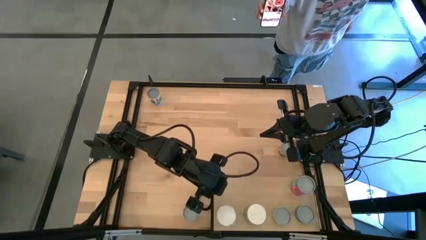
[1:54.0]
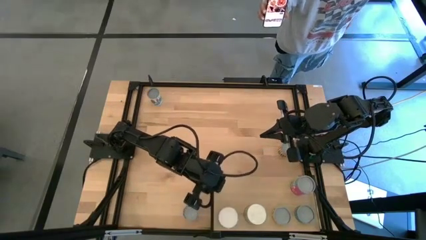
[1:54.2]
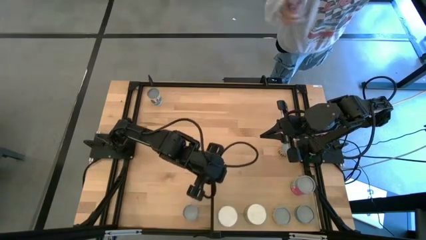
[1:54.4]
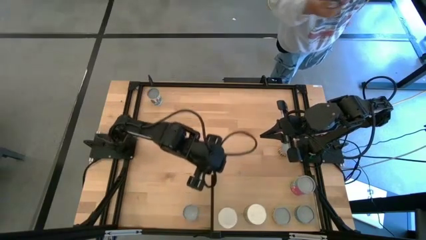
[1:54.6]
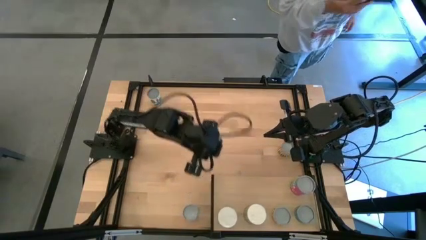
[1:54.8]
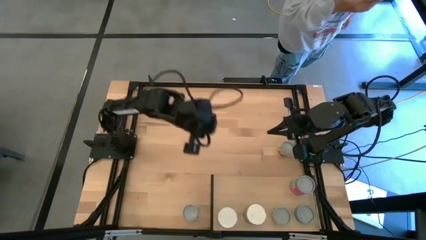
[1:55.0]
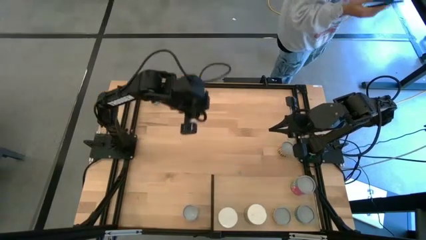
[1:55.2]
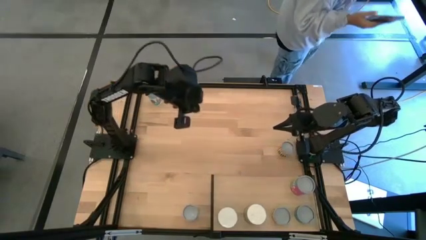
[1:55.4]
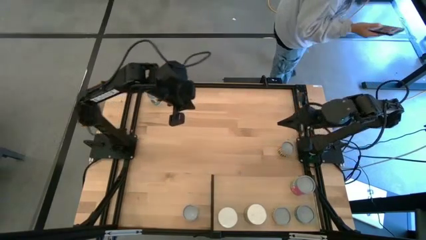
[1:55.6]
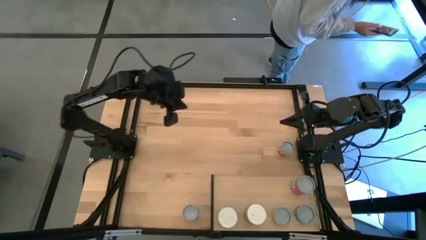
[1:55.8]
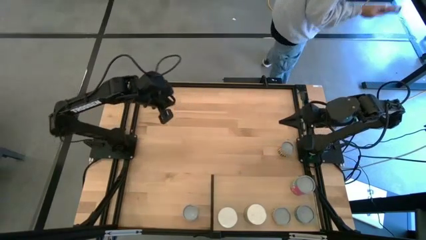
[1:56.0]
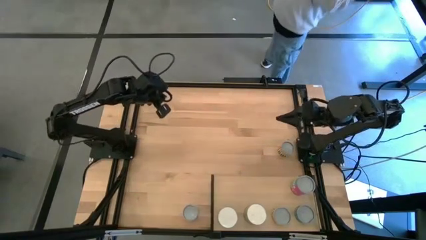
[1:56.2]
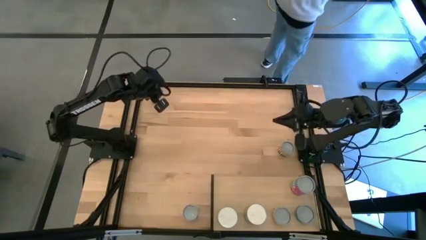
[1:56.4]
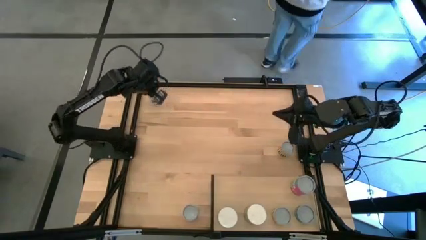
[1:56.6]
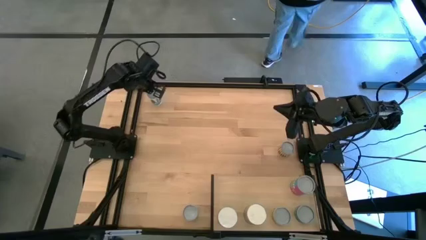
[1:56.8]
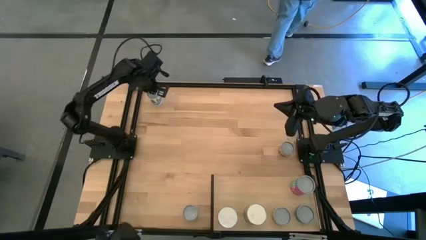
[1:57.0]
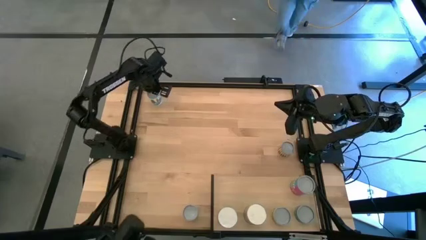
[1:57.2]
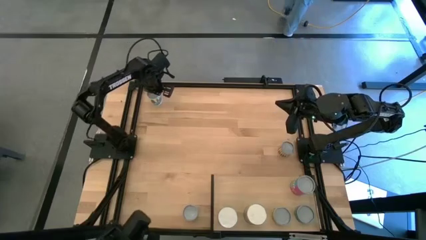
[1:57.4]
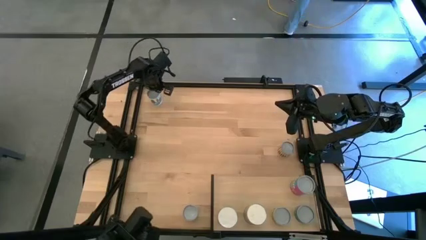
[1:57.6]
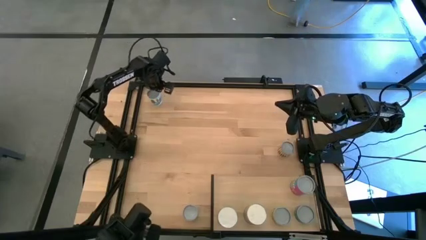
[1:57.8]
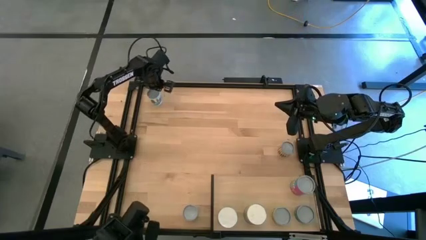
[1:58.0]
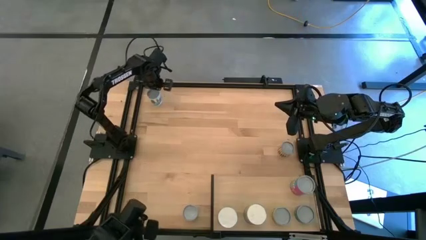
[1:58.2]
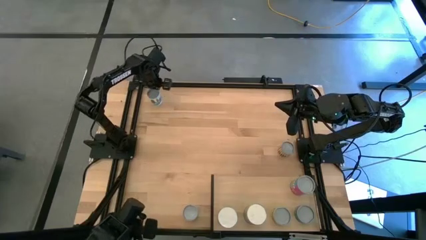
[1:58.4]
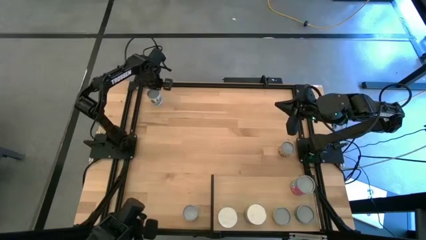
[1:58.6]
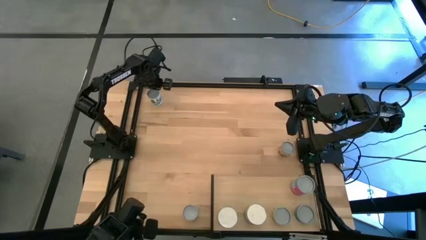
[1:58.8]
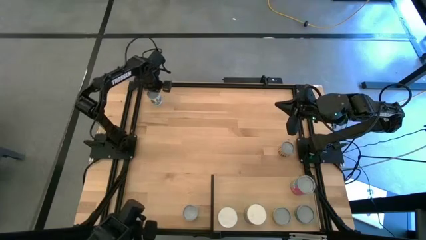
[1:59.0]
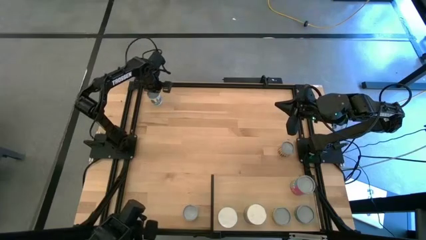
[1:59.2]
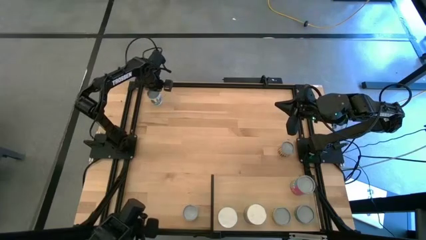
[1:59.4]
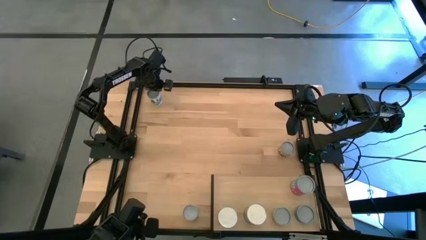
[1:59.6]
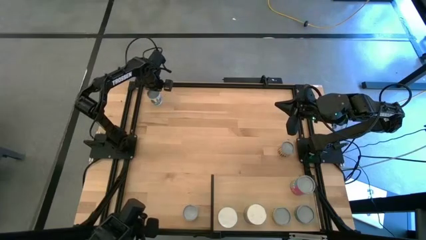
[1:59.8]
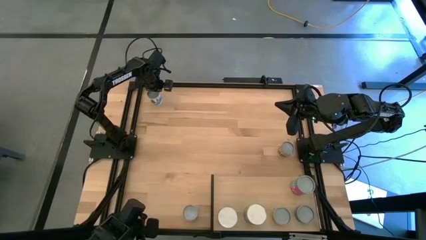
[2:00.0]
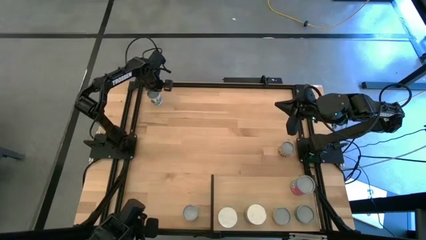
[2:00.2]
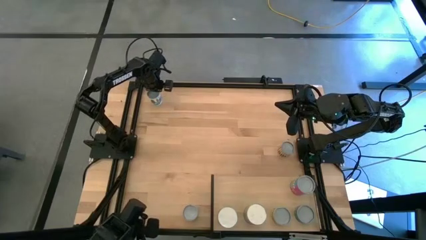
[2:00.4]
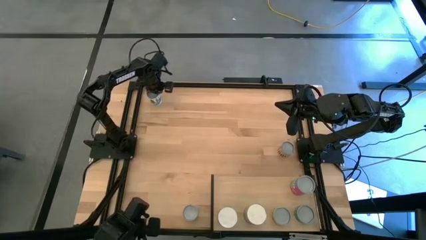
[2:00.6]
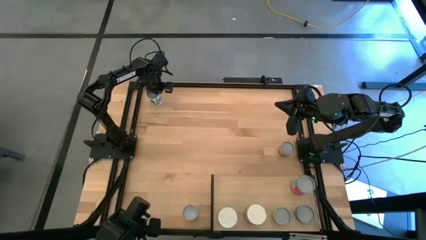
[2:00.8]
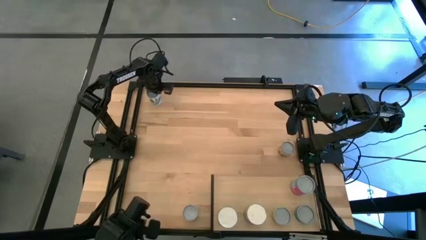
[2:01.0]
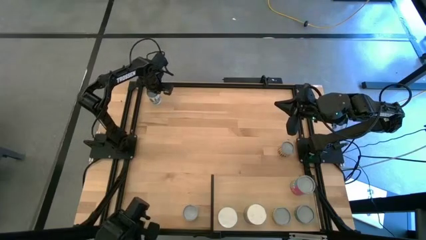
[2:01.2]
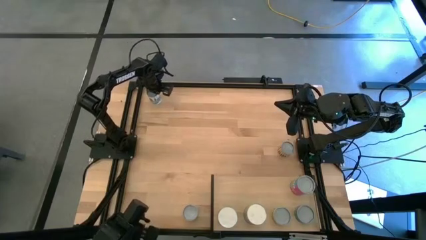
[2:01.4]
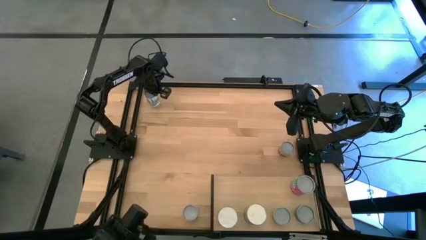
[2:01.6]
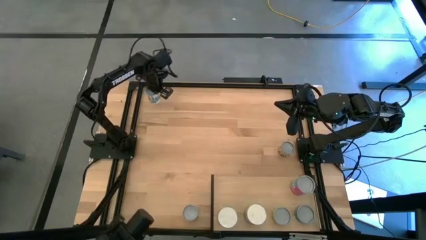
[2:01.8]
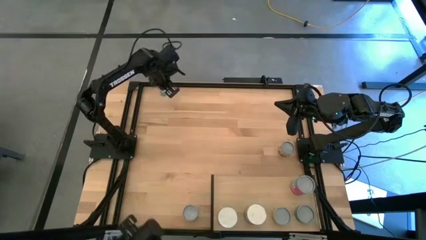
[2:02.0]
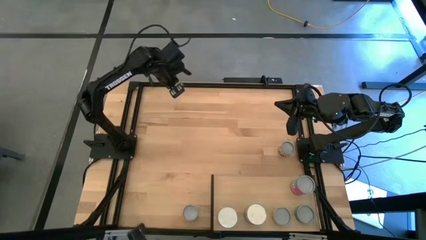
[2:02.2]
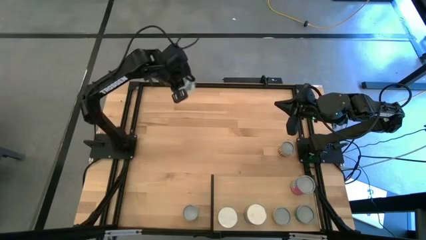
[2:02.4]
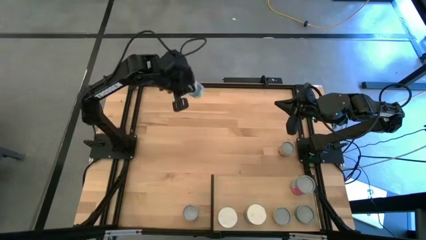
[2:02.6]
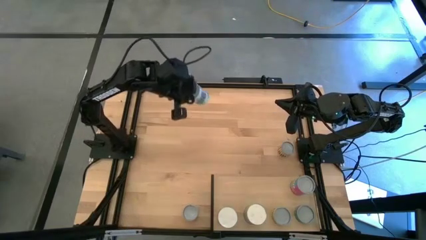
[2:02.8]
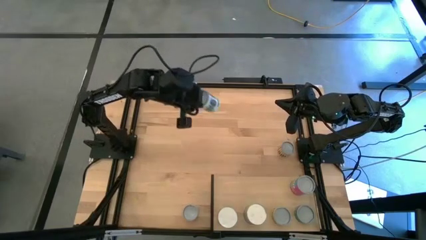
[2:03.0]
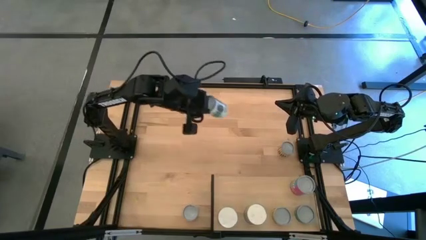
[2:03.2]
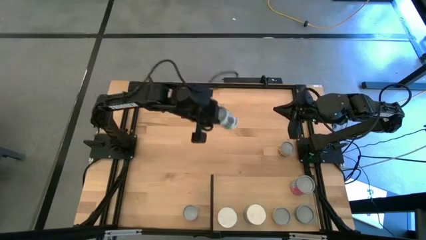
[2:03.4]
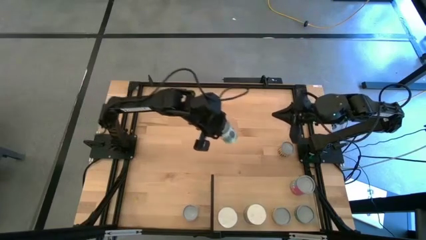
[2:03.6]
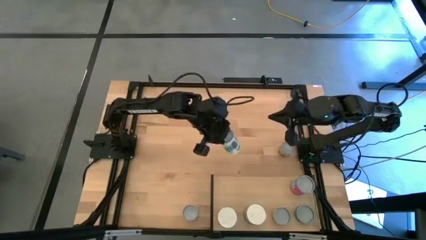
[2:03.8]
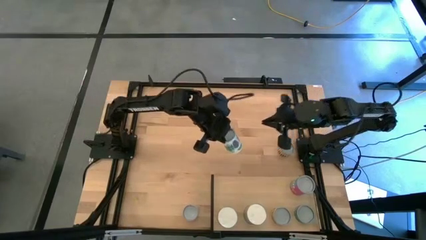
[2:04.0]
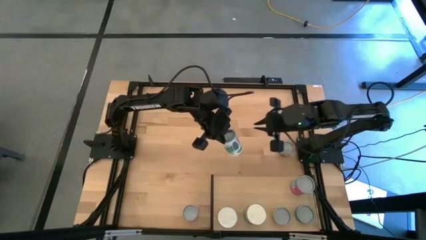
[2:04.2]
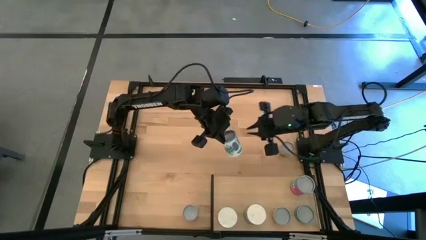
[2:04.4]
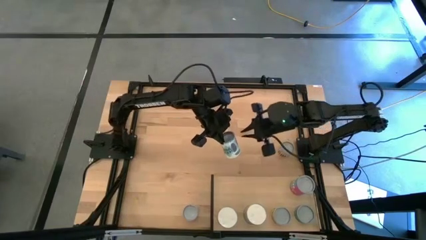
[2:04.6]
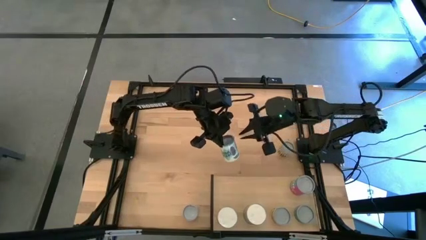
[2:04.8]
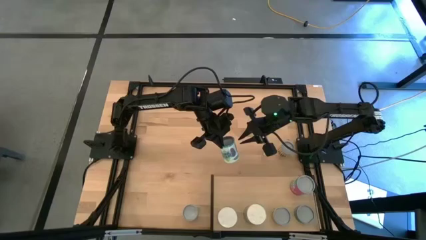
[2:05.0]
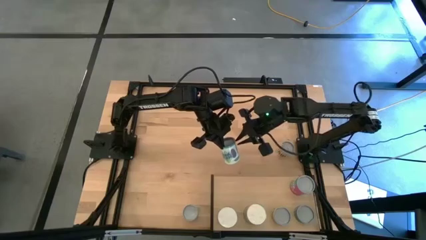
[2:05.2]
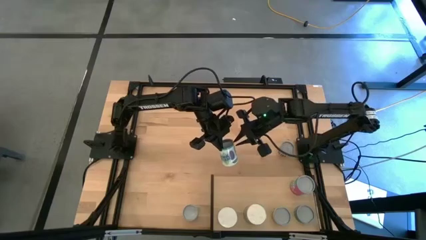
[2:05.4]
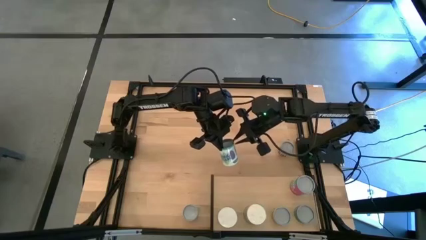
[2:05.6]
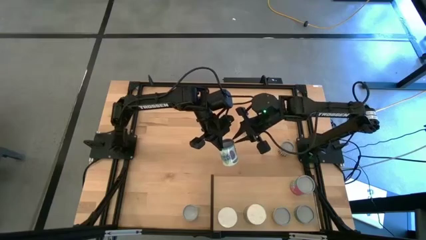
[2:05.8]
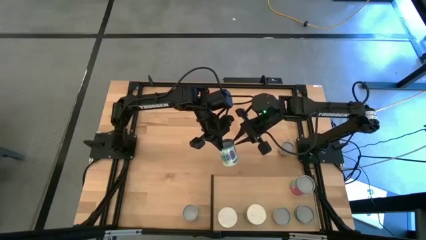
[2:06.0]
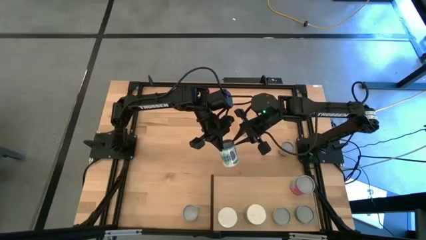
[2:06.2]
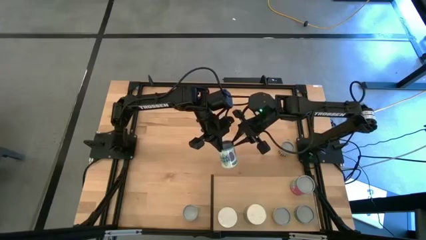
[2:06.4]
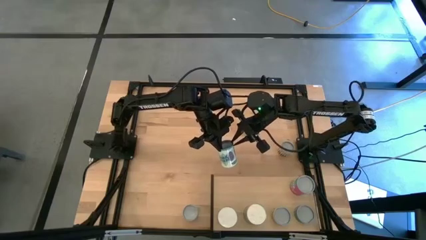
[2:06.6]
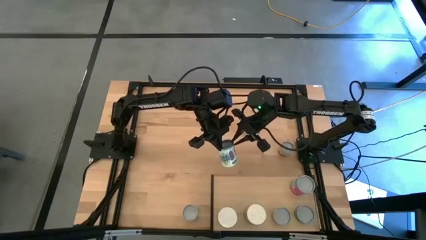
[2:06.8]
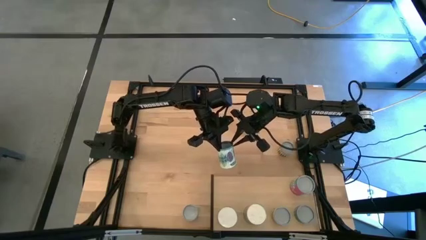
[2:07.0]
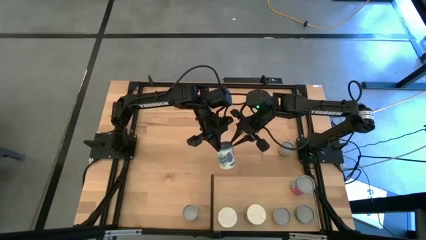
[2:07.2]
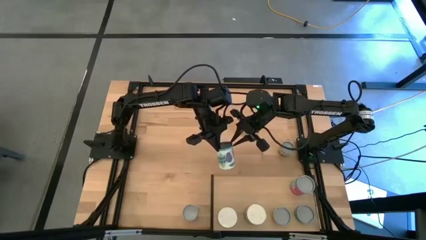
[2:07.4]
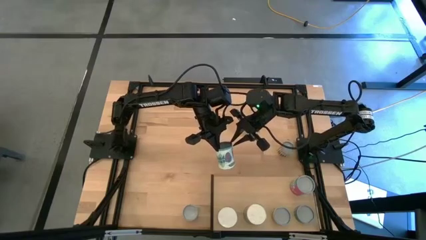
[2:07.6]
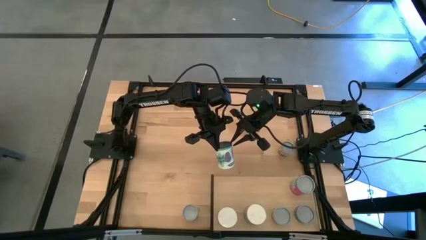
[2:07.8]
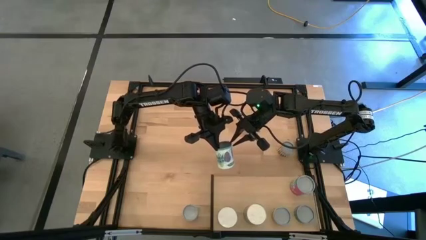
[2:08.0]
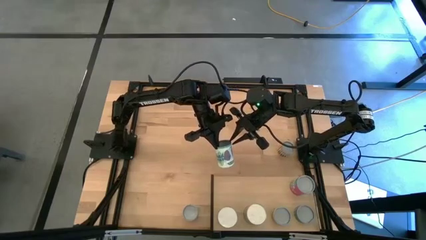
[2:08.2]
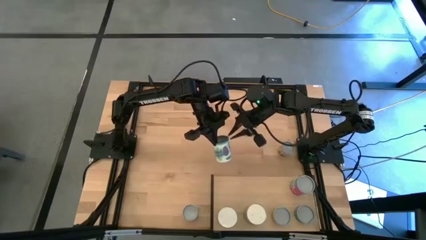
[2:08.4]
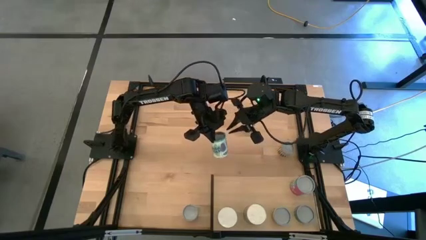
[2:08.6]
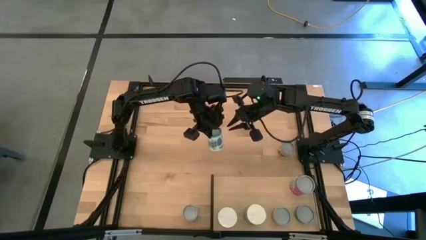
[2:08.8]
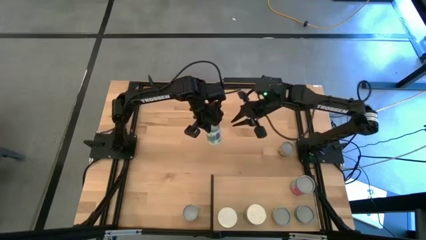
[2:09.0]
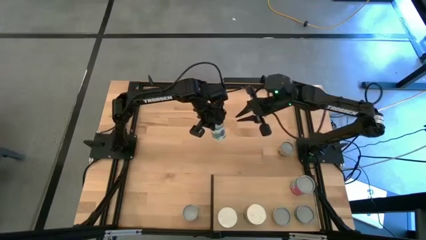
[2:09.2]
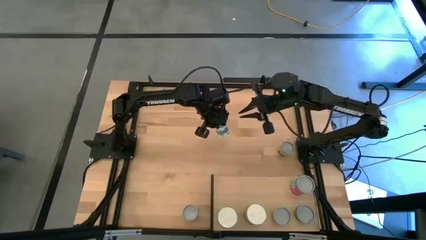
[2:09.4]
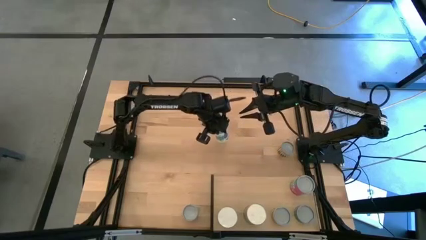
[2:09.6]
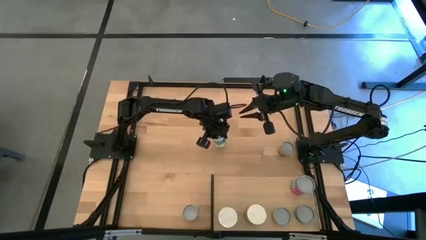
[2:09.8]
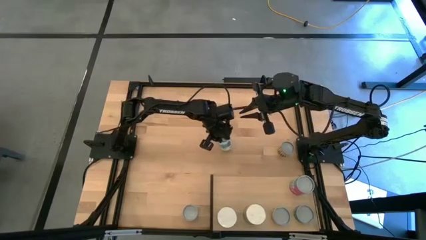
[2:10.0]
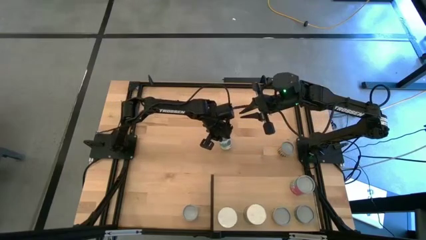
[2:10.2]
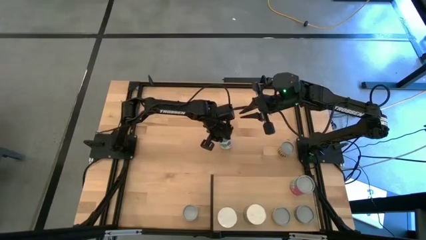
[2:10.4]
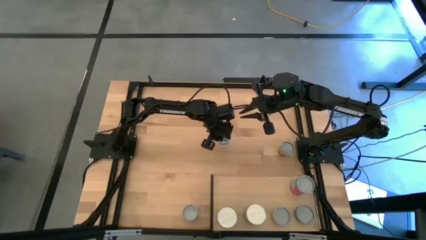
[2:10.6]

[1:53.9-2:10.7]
Task: Pick and place cans onto a shelf
Put the canned mixed vegetables on the shelf
